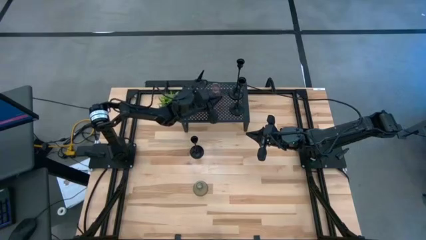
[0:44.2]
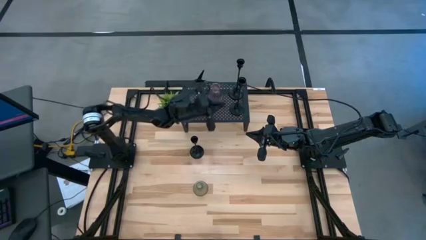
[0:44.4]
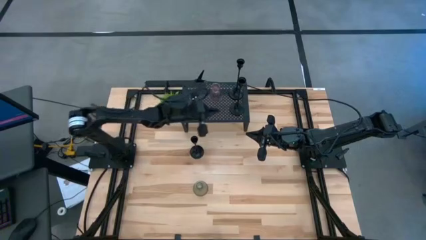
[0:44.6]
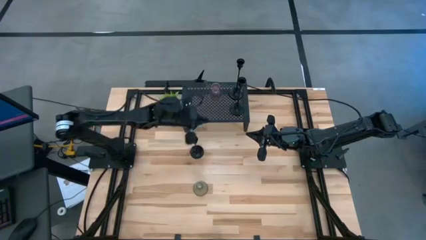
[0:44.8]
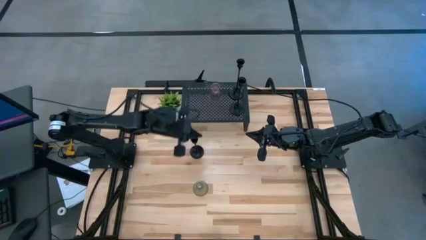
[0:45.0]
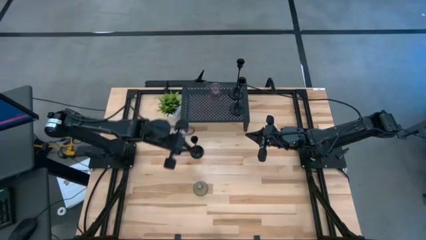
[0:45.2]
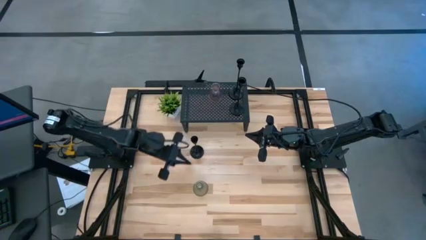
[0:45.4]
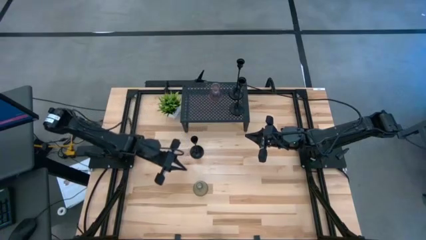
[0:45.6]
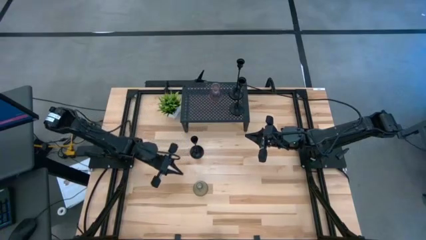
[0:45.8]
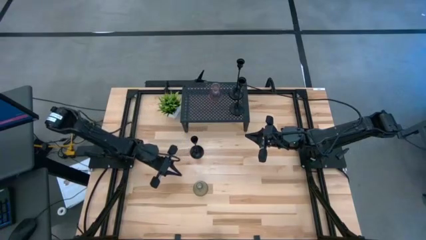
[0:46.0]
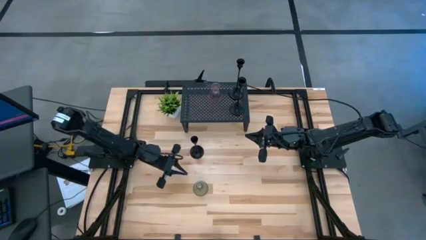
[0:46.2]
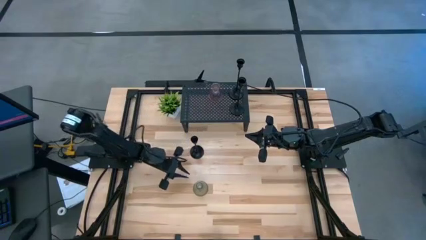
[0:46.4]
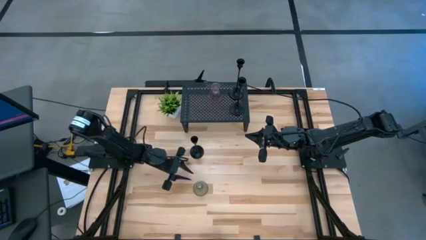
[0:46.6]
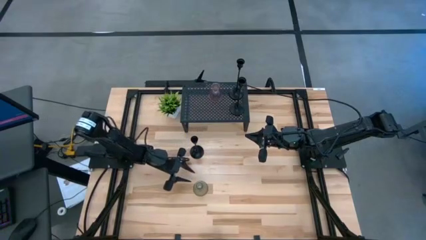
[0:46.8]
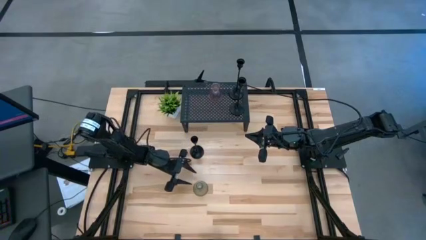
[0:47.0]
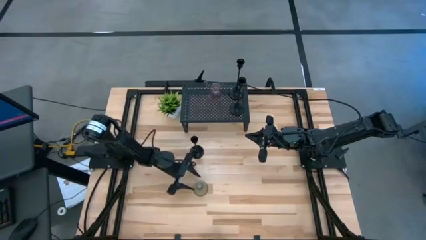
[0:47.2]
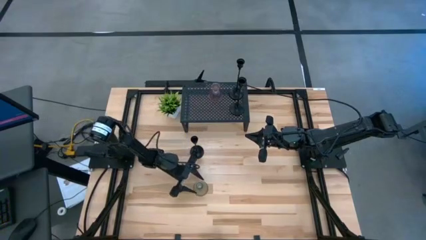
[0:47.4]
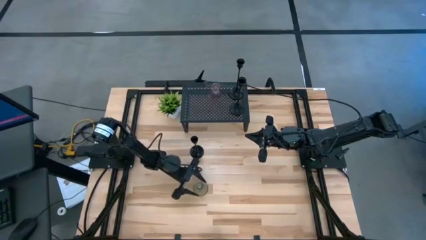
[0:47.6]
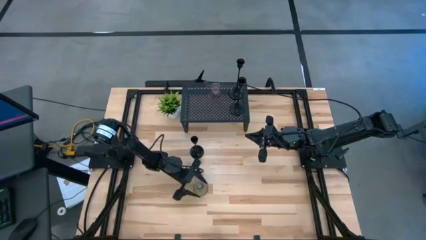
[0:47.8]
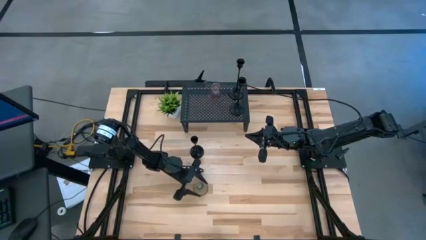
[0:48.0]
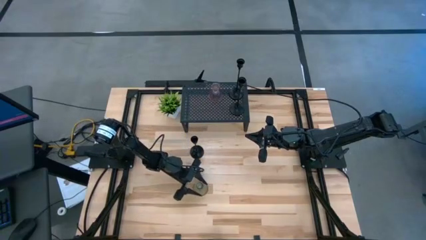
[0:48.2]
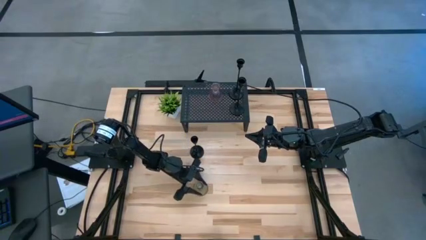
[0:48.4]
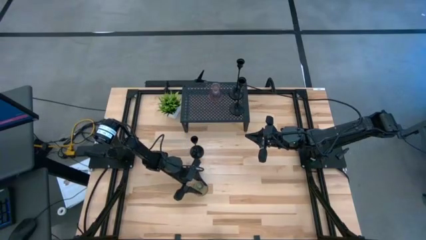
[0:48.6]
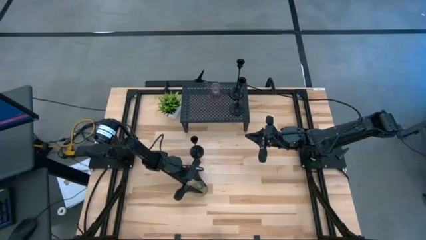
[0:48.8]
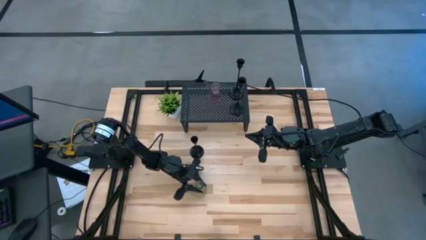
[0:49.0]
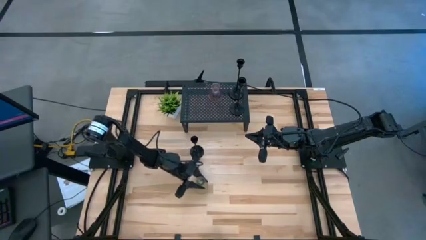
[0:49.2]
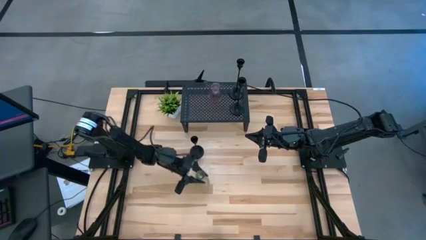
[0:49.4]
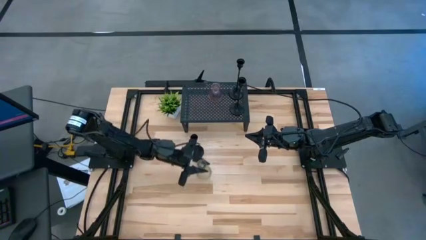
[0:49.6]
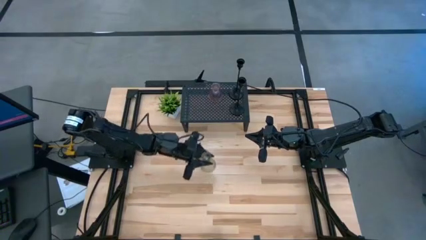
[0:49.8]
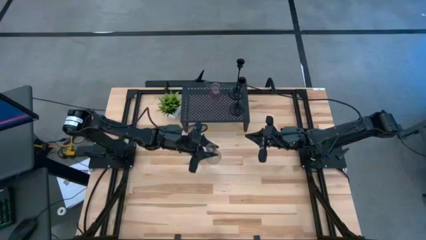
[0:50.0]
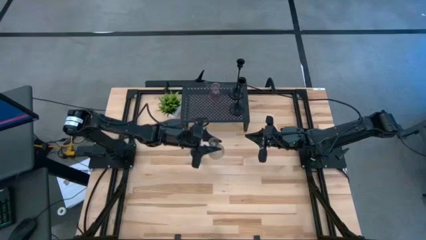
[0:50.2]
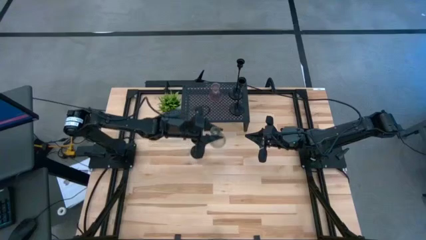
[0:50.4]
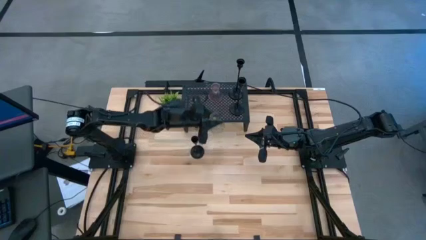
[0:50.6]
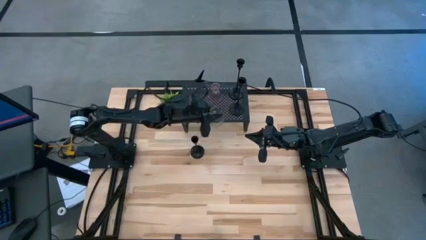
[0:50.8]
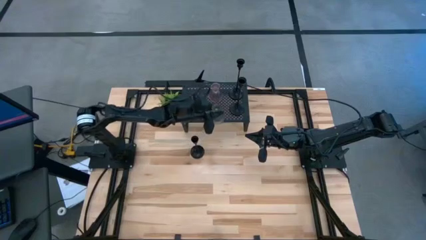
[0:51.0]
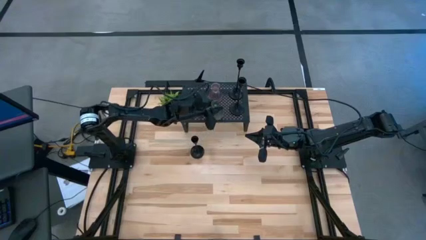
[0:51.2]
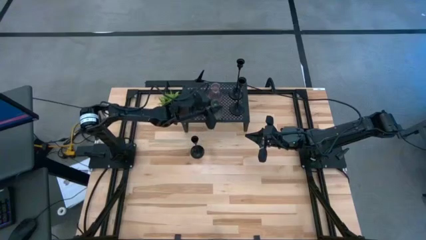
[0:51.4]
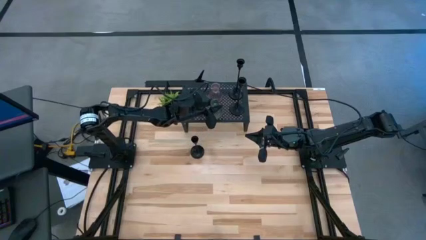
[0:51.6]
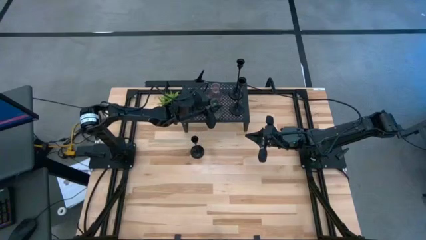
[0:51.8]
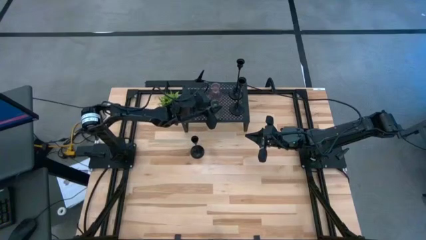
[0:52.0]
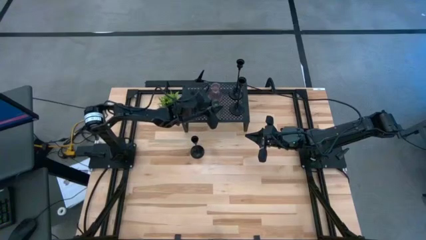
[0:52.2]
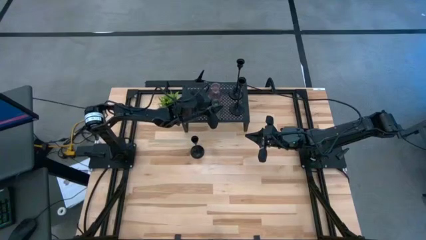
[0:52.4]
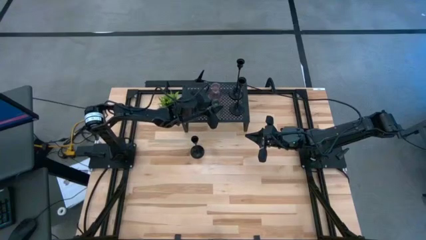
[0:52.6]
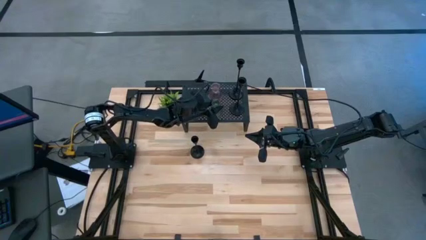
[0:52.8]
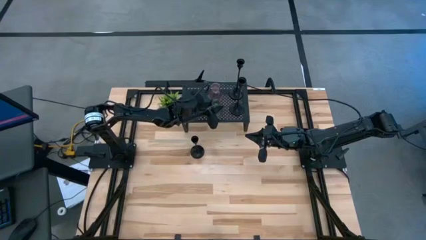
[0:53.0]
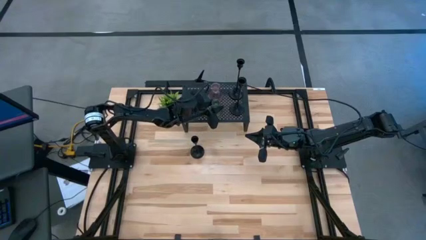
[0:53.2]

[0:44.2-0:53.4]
Task: Pick & Place candle stick holders
Align the green glass candle holder with the pink glass candle holder on the shelf

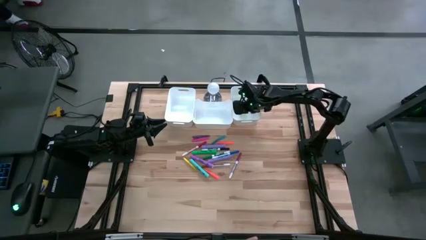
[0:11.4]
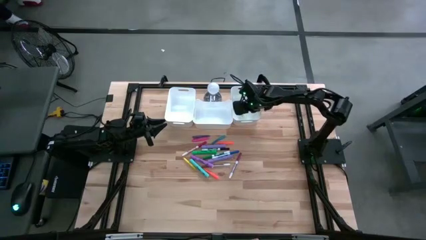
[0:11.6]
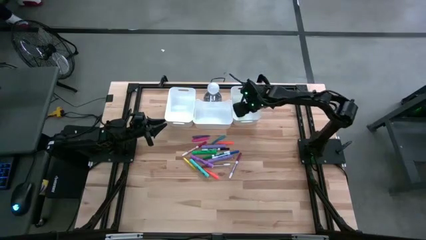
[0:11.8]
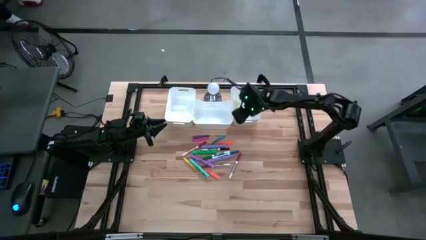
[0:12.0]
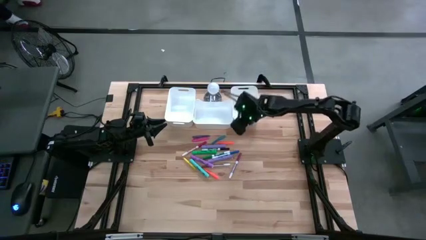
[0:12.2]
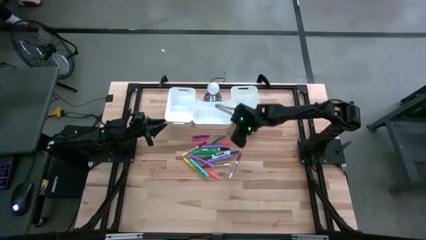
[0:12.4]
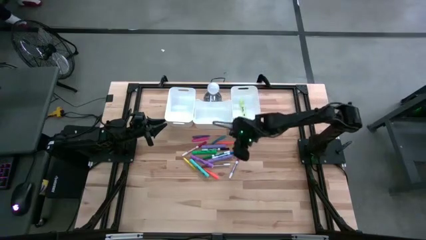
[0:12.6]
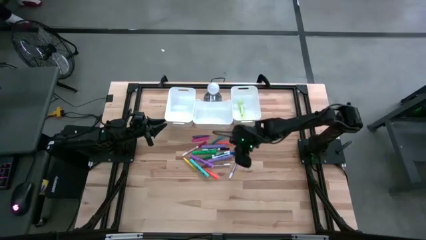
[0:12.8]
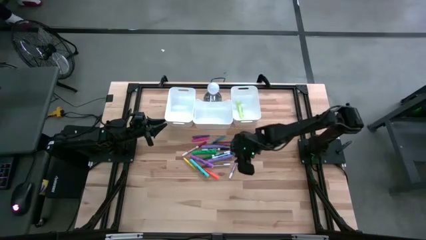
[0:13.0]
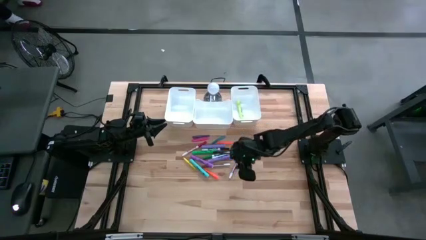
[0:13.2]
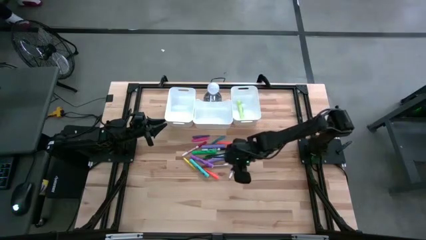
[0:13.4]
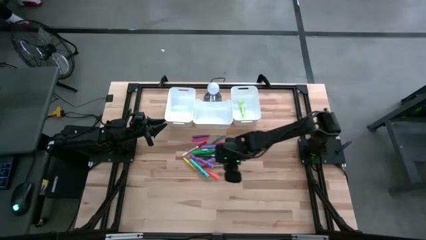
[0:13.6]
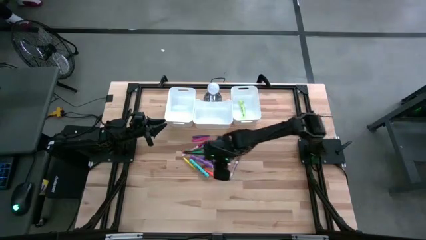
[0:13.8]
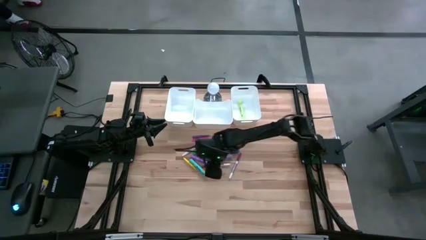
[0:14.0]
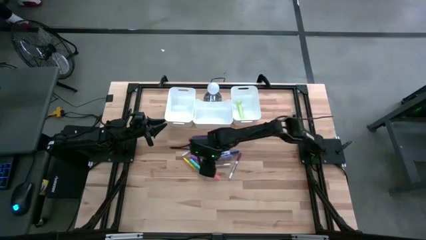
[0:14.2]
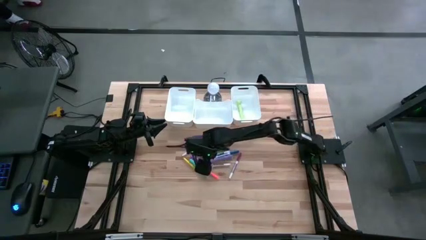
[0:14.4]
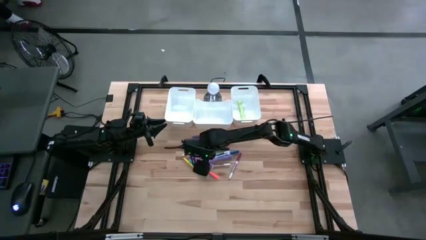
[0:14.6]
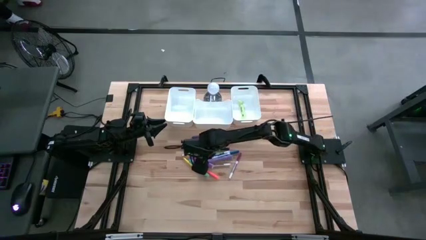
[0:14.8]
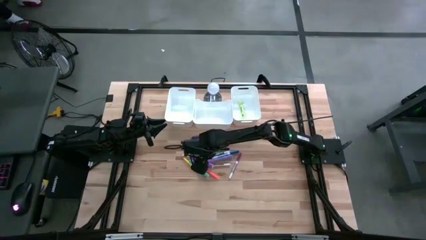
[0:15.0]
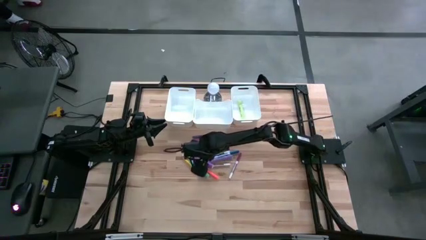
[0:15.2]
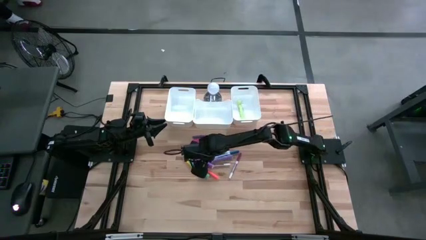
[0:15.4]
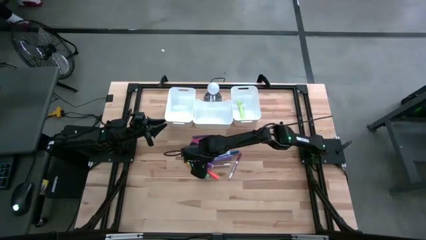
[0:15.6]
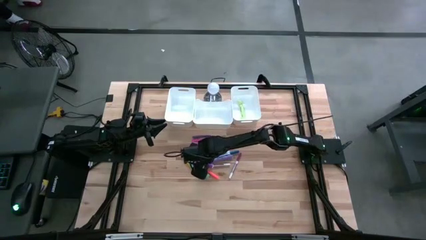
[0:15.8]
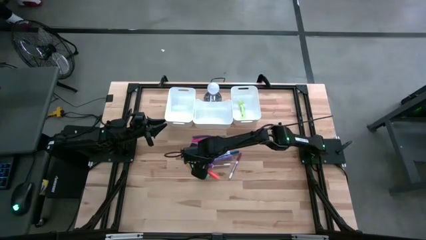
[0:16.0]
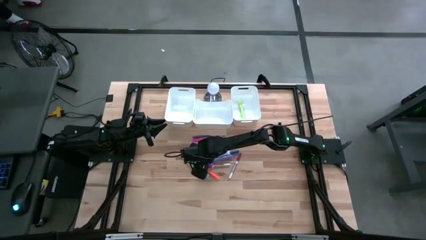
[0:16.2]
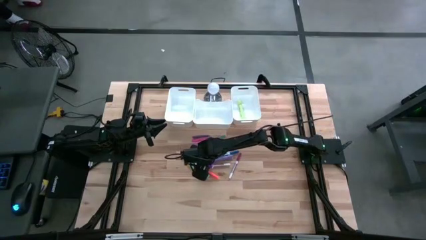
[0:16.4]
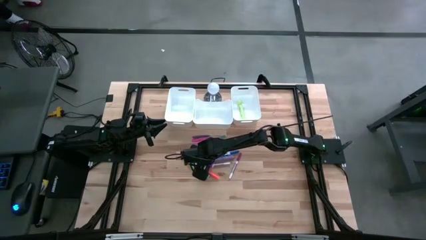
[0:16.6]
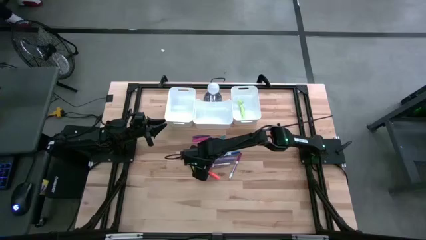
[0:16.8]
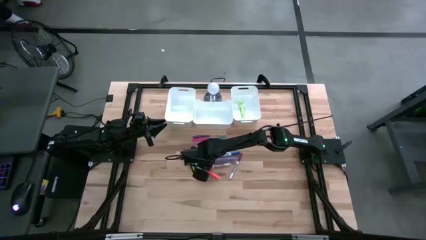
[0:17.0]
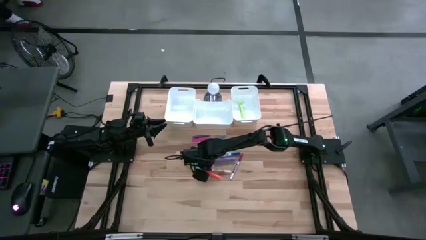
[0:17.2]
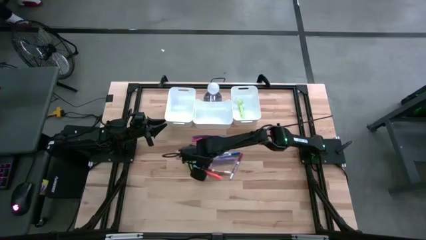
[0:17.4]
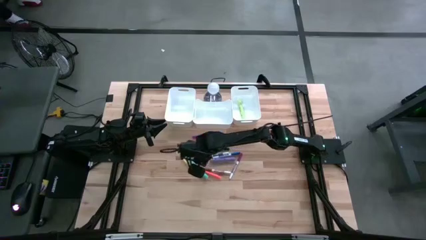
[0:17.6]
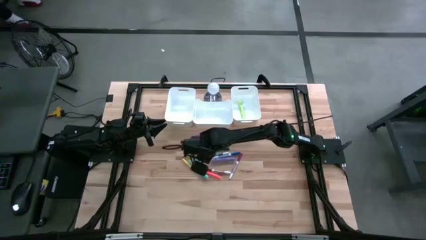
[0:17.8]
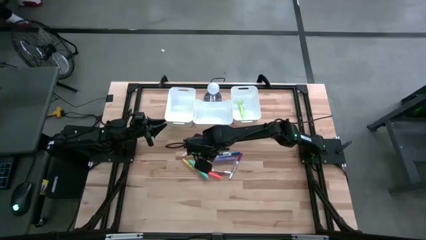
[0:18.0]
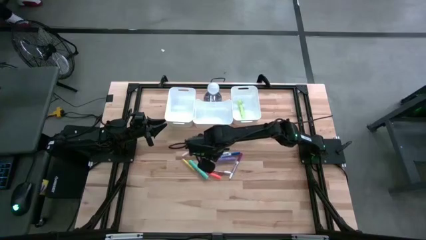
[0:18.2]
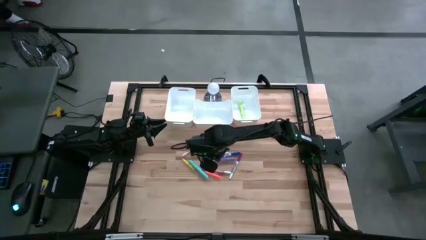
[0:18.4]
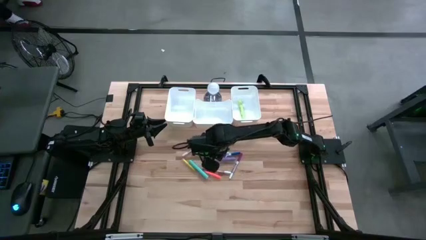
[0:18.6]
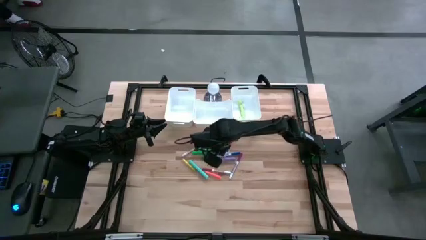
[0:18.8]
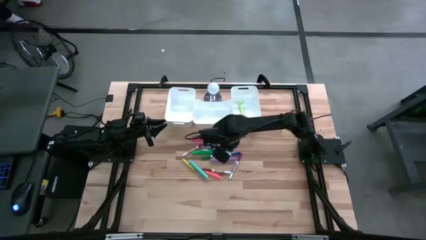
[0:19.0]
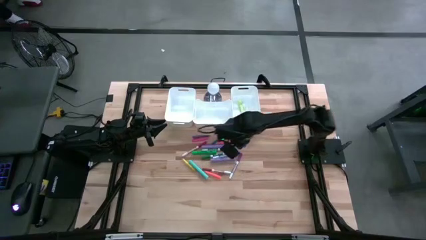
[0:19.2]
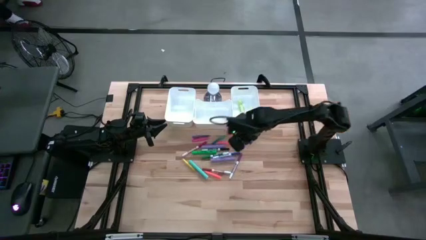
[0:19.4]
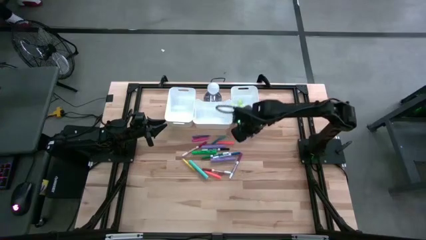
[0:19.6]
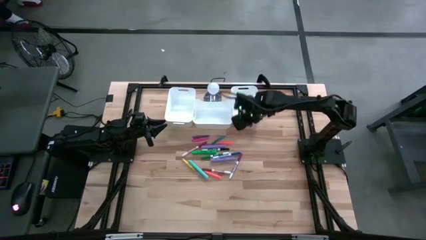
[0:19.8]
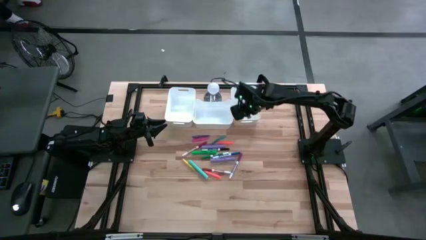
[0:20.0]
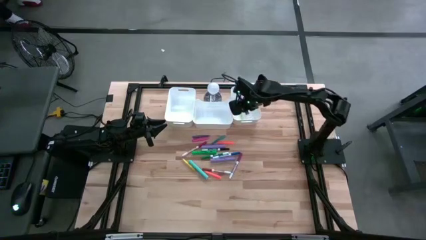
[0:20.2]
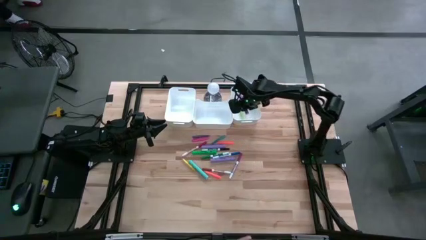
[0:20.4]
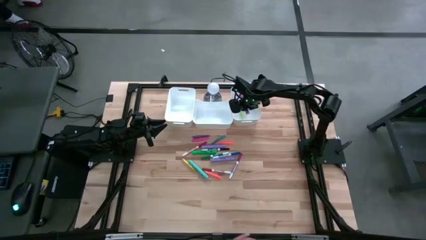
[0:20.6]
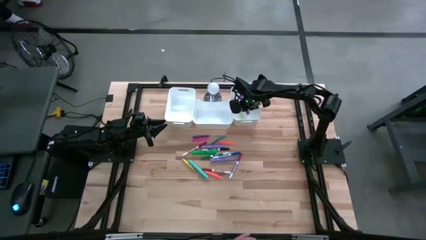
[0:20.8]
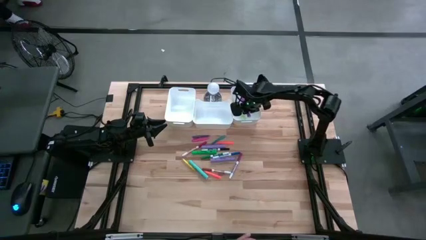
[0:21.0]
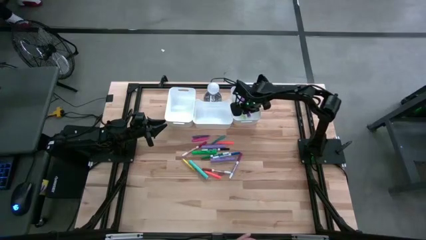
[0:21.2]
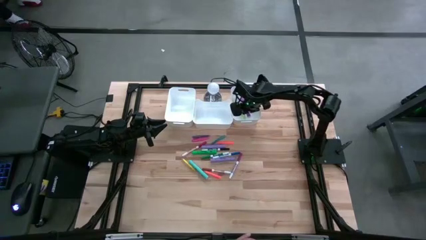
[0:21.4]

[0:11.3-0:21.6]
Task: Pick & Place Markers
Put the violet highlighter pen into the right white bin
